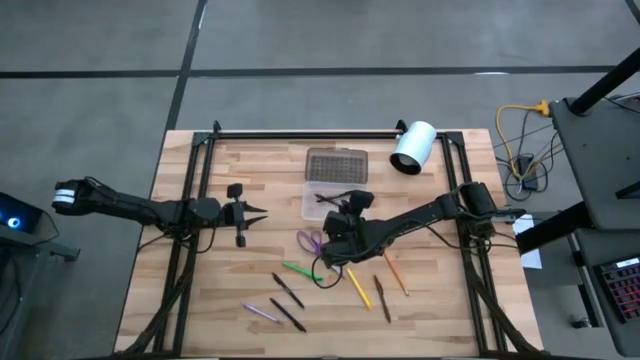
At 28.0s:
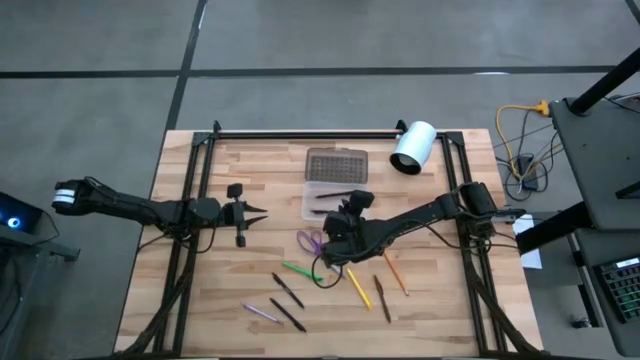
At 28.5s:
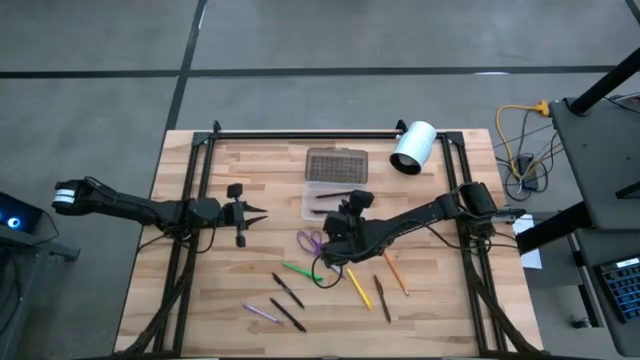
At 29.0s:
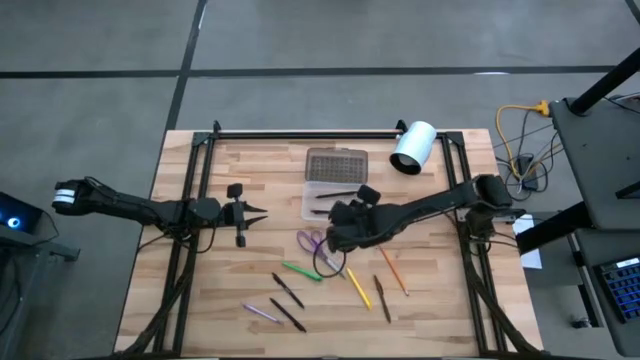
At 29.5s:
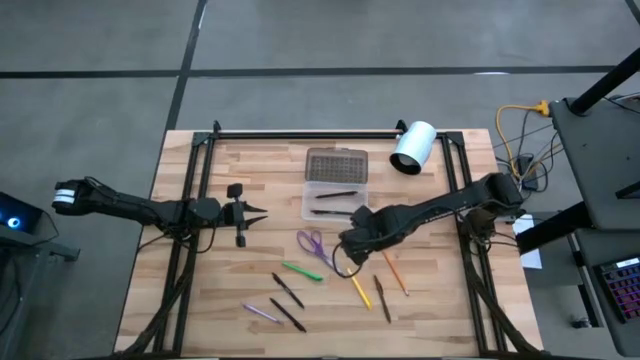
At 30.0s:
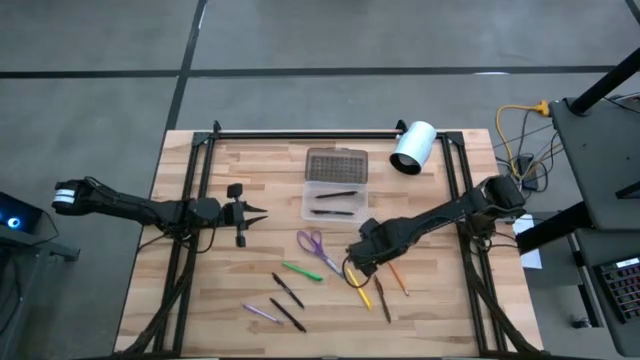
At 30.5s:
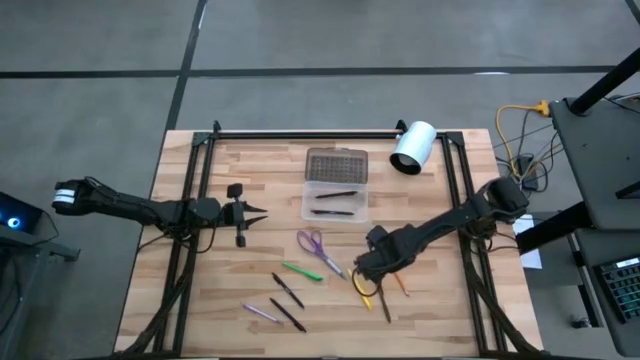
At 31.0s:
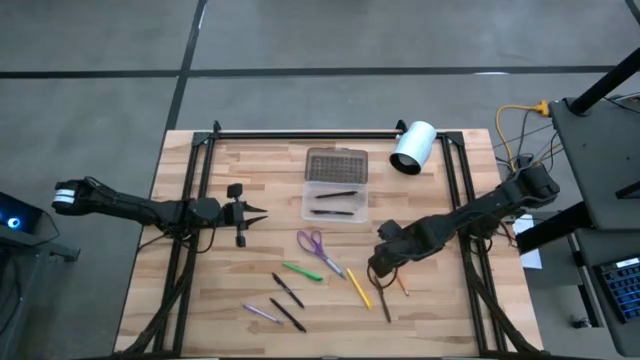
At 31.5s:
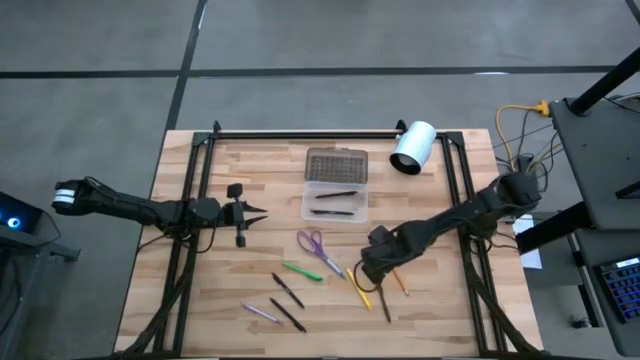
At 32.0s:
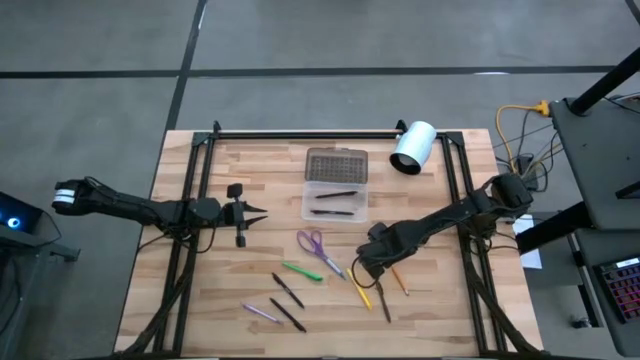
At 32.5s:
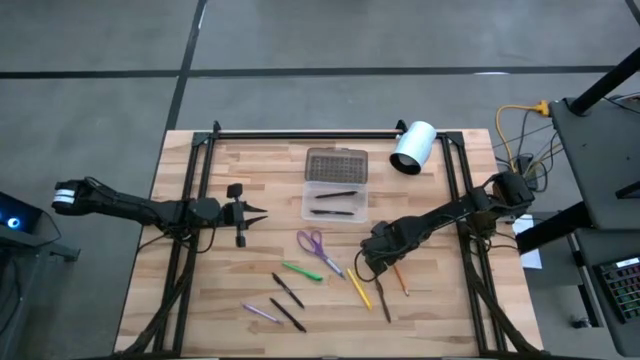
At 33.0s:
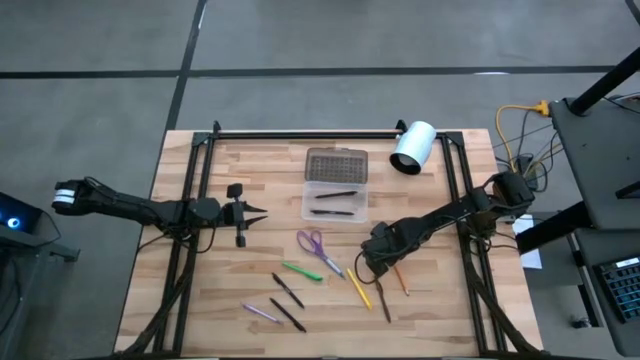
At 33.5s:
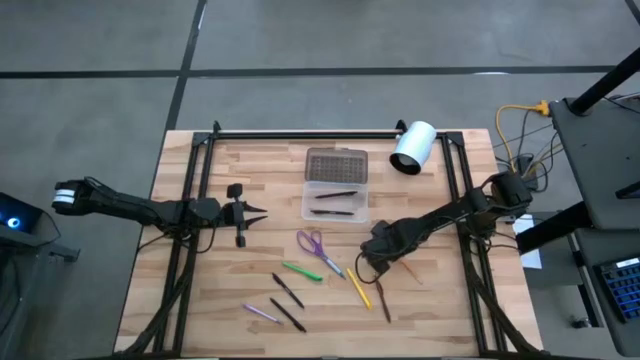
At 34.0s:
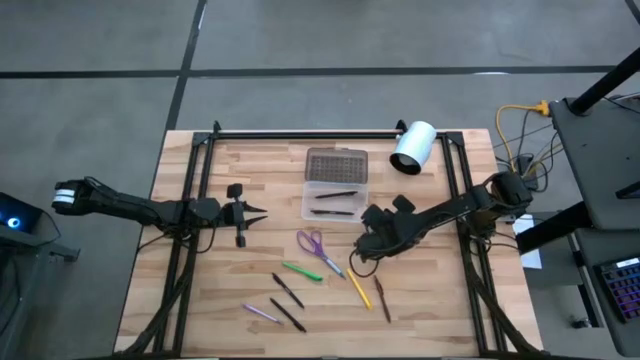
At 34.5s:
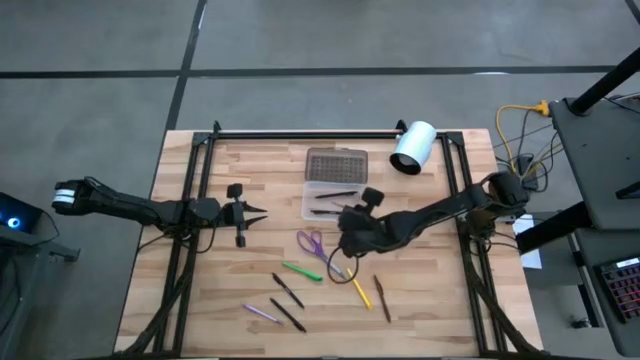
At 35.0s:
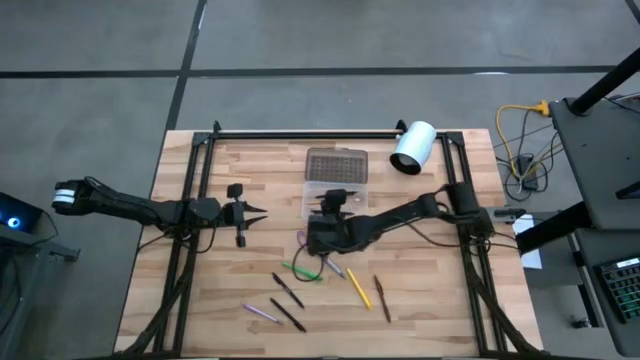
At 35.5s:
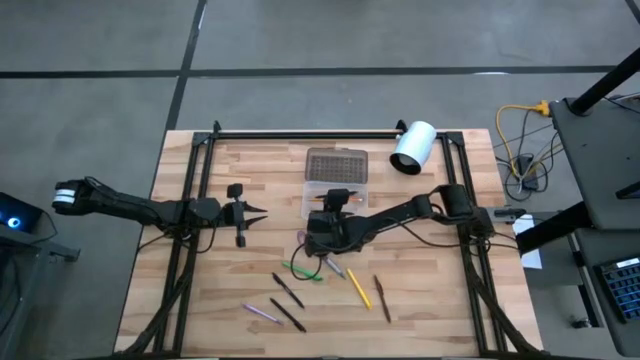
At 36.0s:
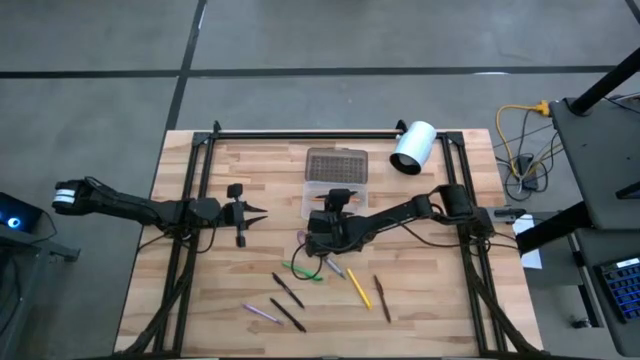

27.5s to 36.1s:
Task: Pick & place school supplies into a supply box
Put the orange pencil into the transparent bin

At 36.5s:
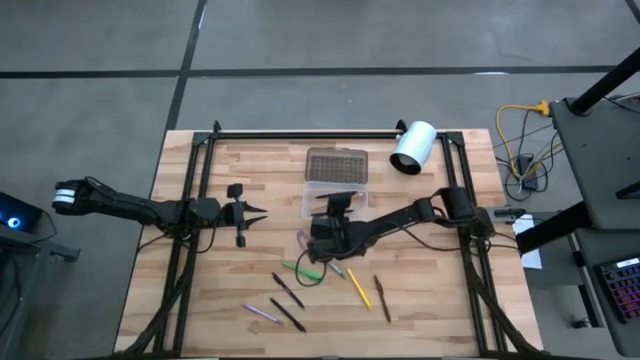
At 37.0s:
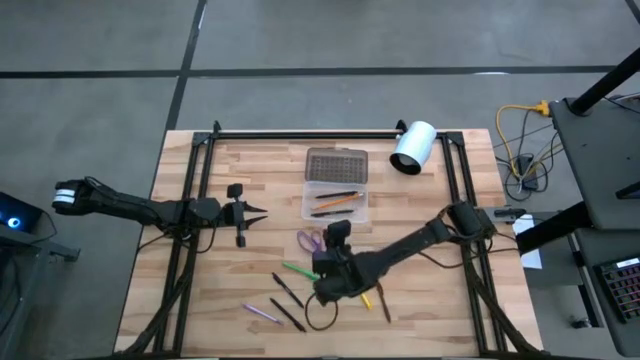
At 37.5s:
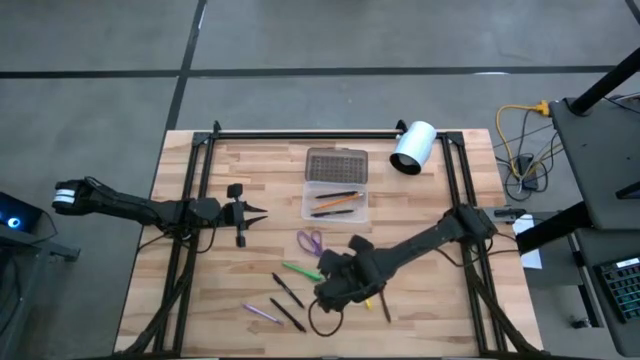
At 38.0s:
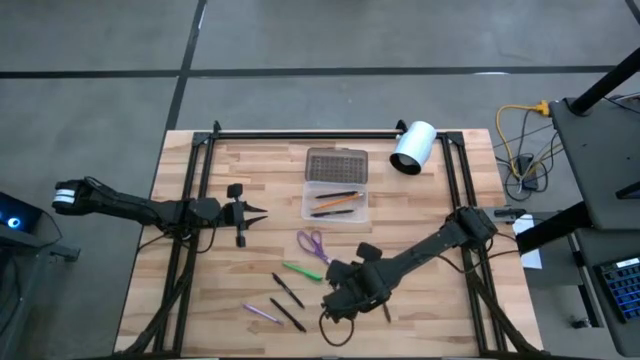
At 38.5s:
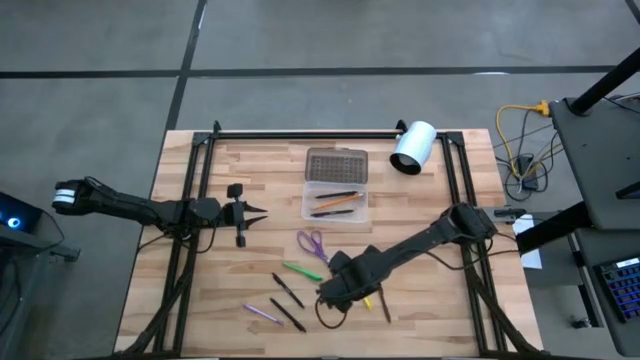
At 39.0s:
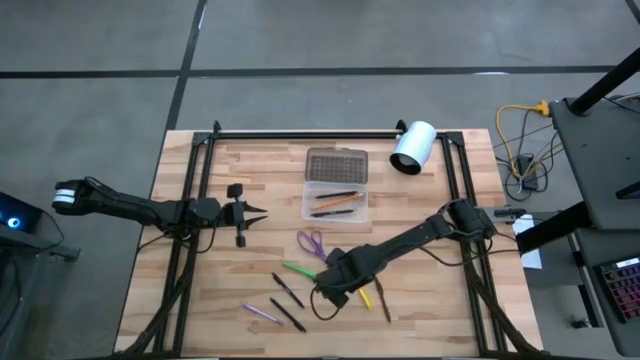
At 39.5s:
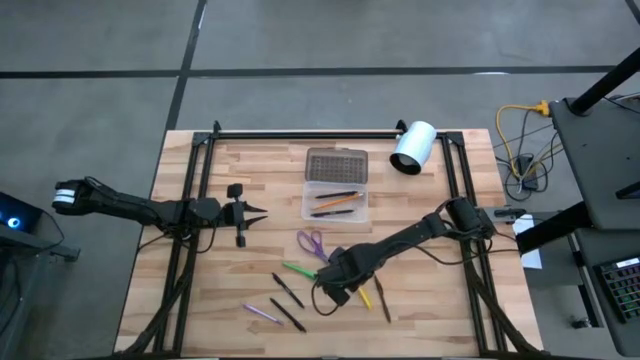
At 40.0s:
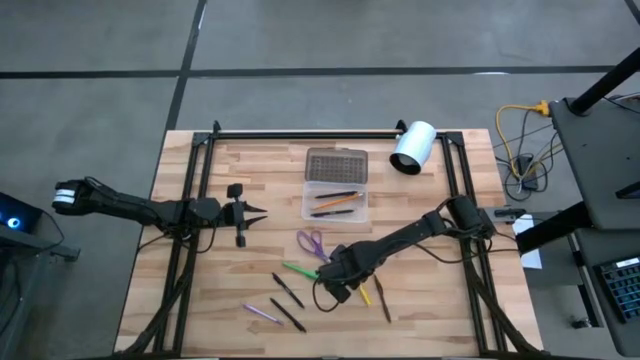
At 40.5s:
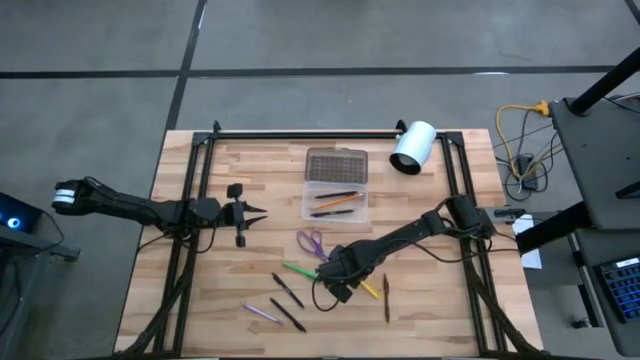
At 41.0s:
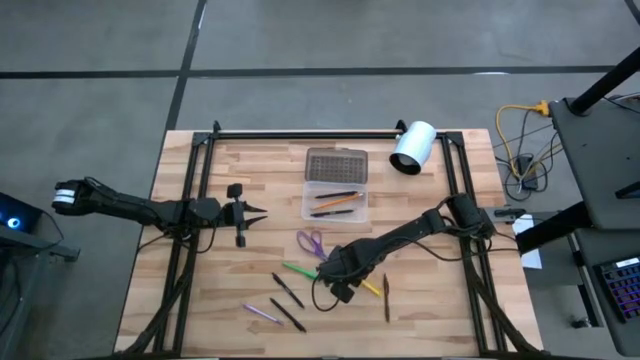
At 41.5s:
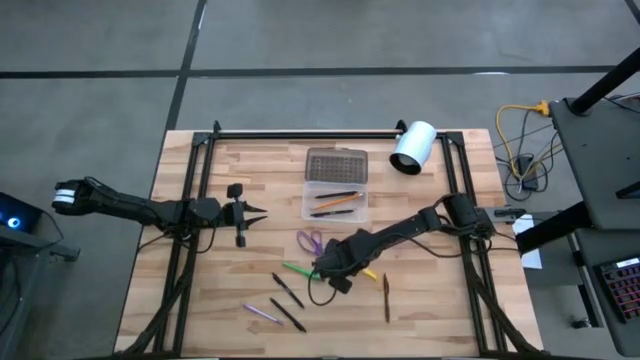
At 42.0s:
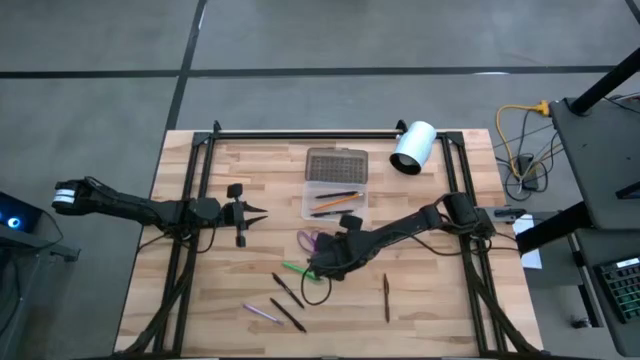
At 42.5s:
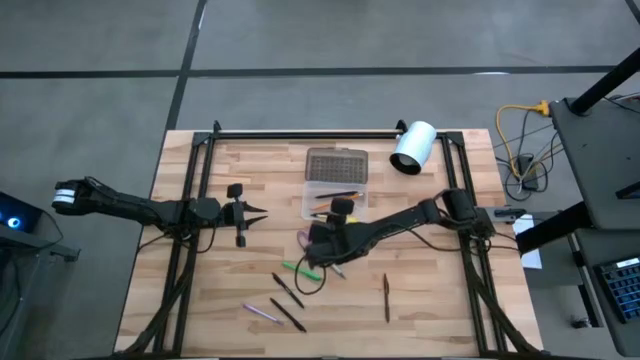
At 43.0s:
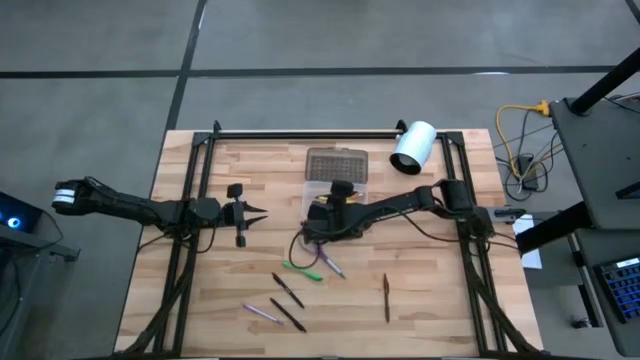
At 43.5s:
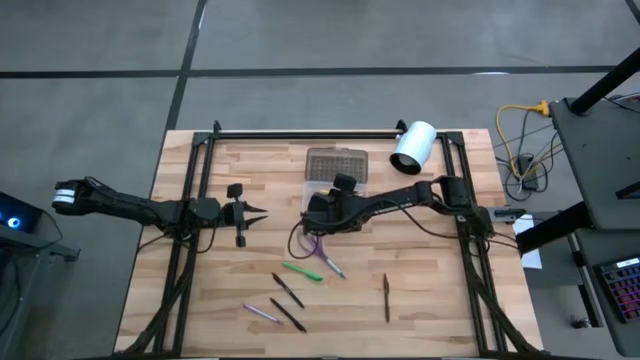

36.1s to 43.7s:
Put the yellow pen into the transparent bin

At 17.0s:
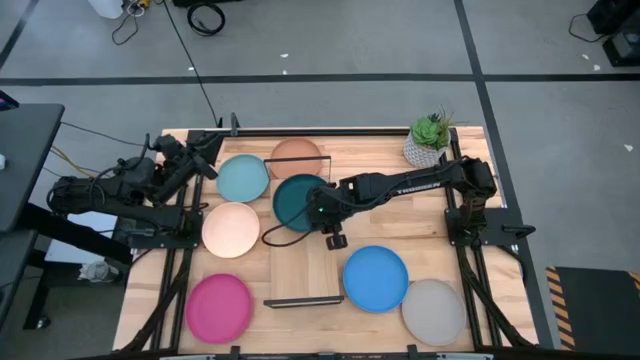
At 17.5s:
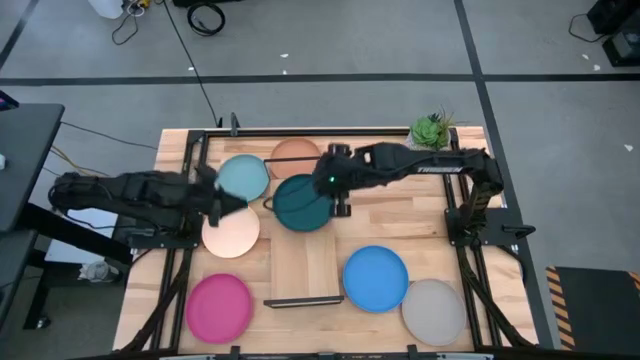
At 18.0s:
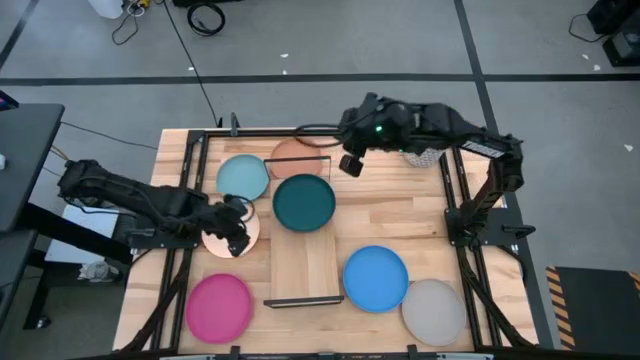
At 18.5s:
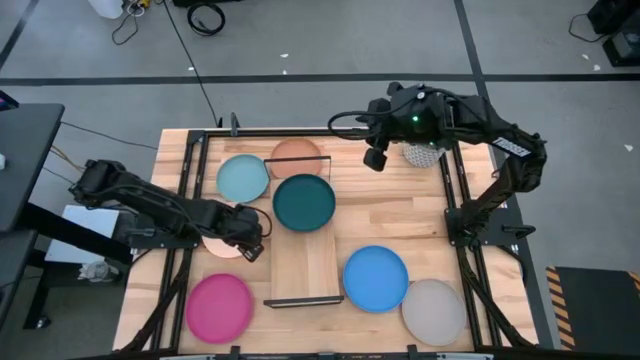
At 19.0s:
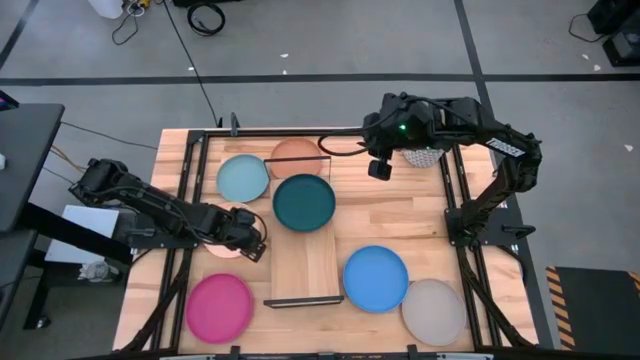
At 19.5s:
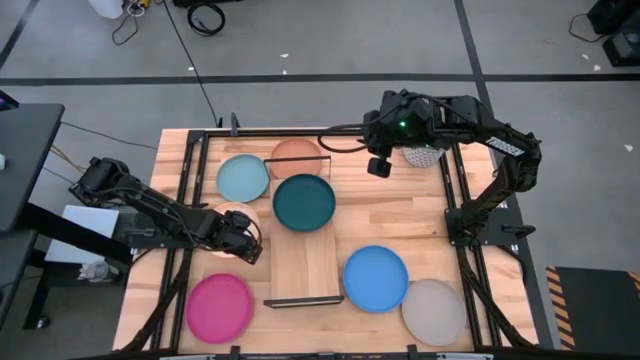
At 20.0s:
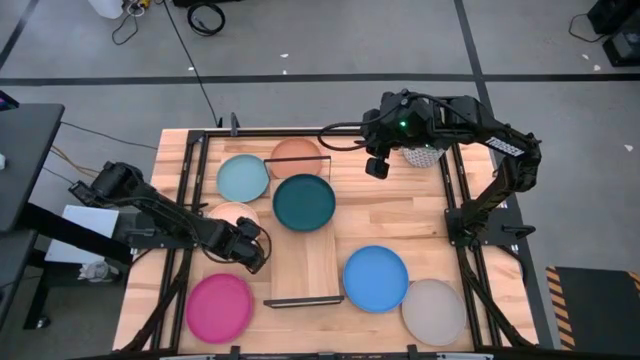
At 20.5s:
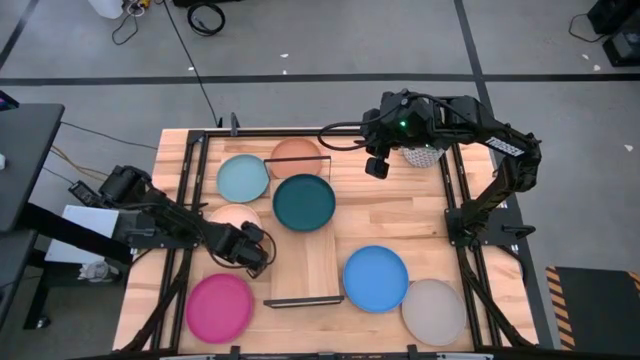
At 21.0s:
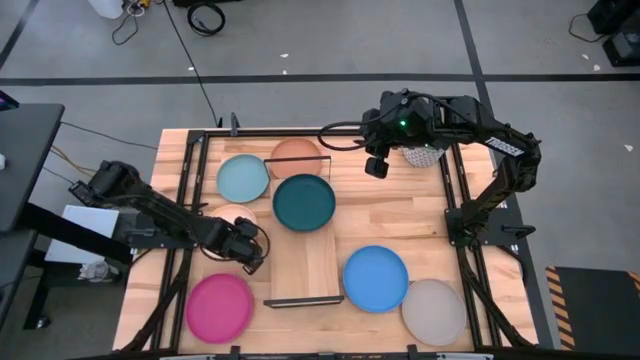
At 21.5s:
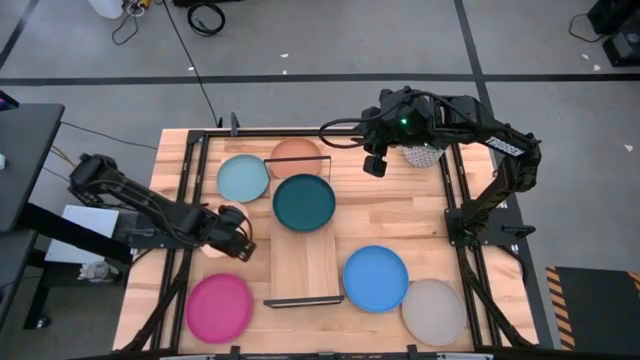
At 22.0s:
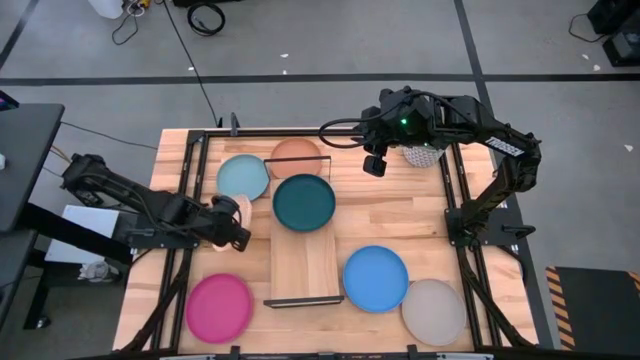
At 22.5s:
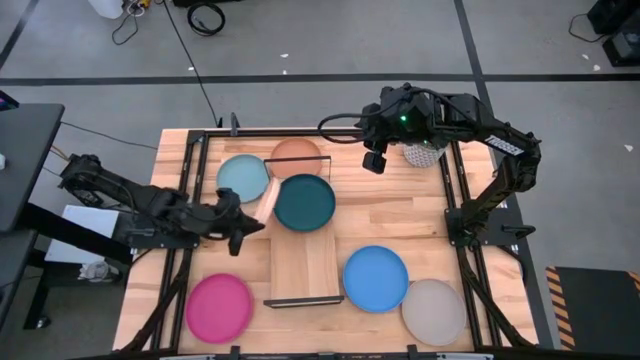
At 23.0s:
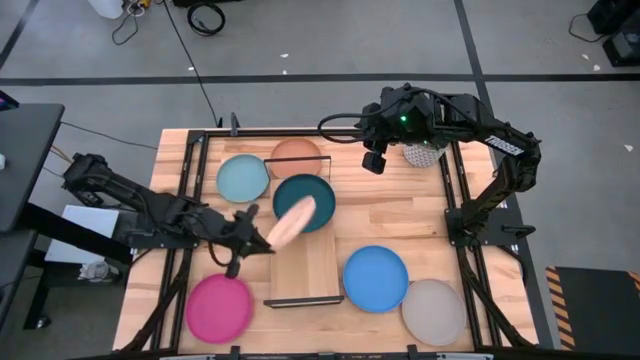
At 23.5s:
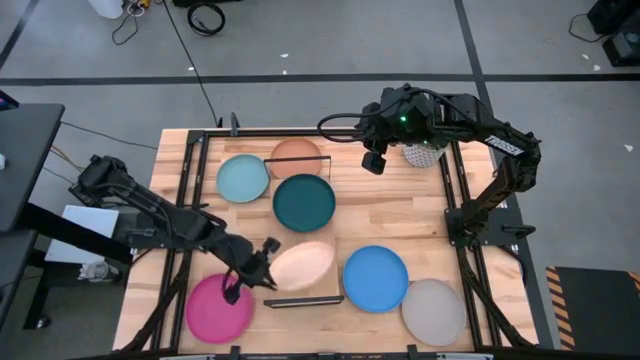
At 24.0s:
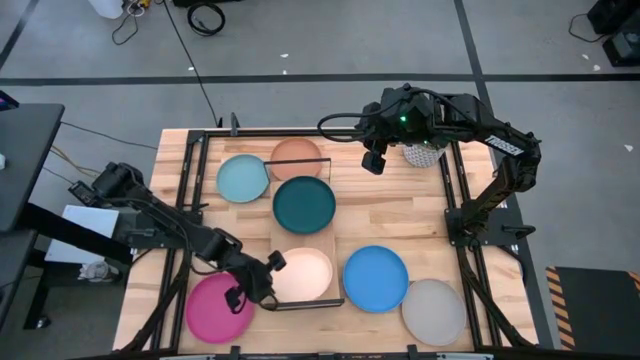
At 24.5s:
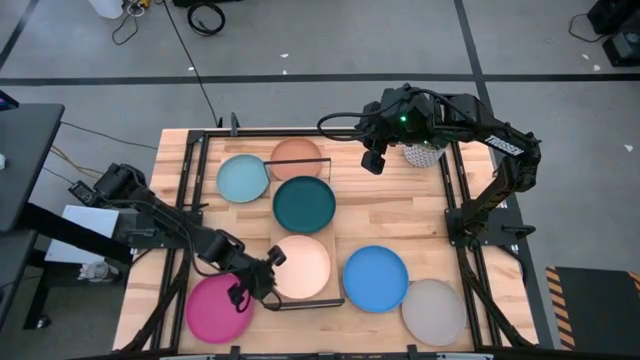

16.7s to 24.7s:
Task: Place and stack plates onto a shelf
Put the light brown plate on the shelf
